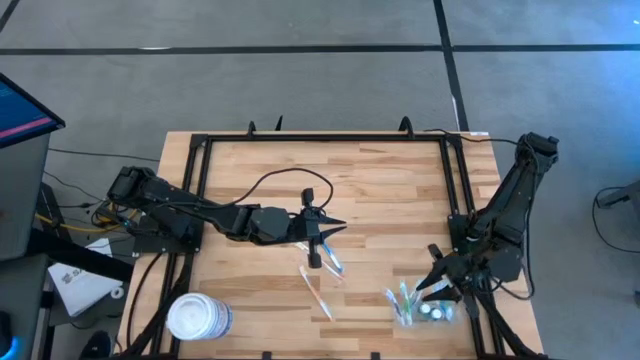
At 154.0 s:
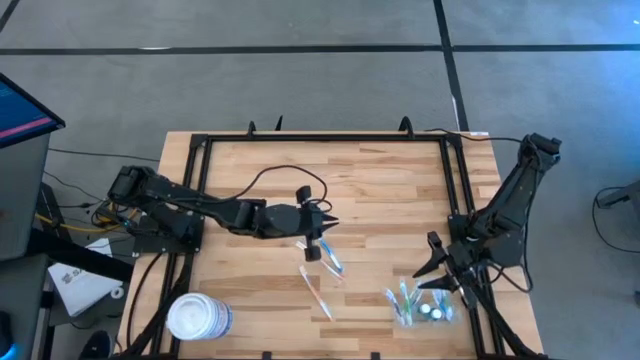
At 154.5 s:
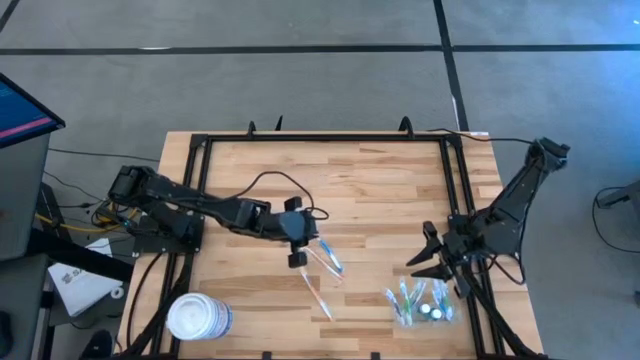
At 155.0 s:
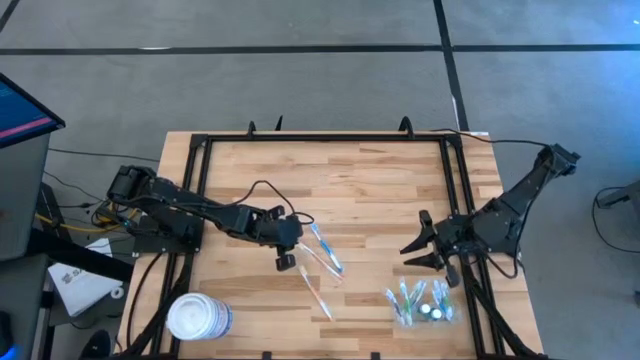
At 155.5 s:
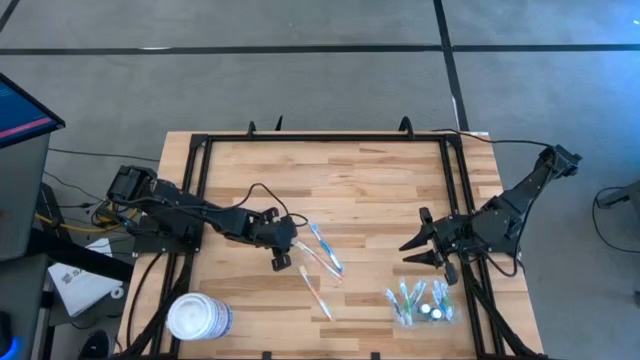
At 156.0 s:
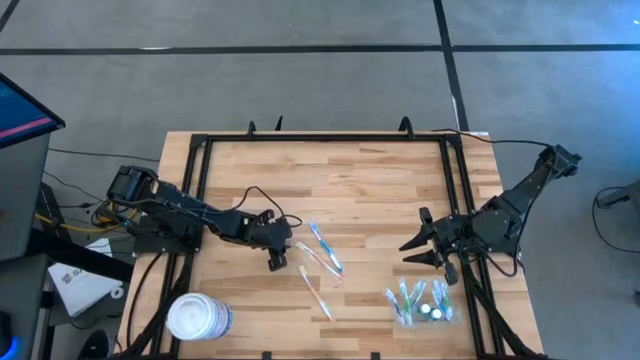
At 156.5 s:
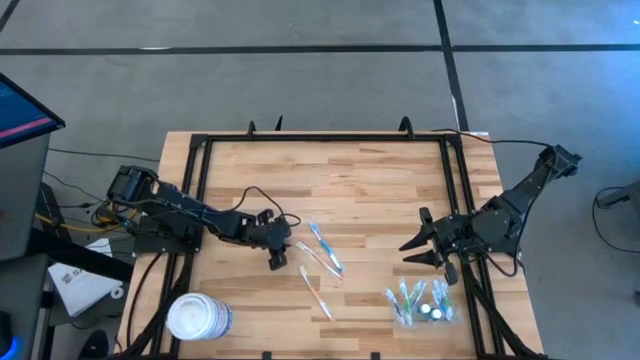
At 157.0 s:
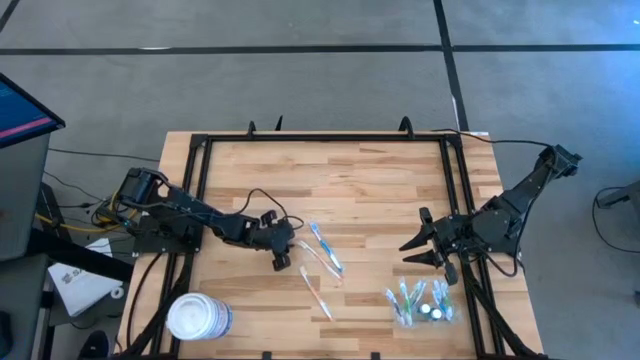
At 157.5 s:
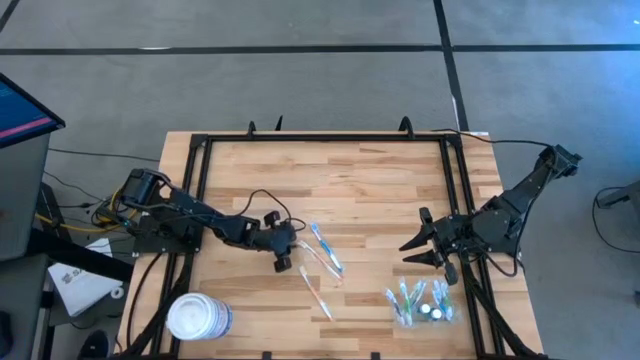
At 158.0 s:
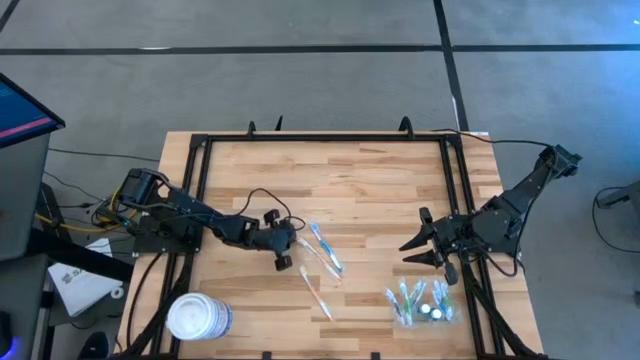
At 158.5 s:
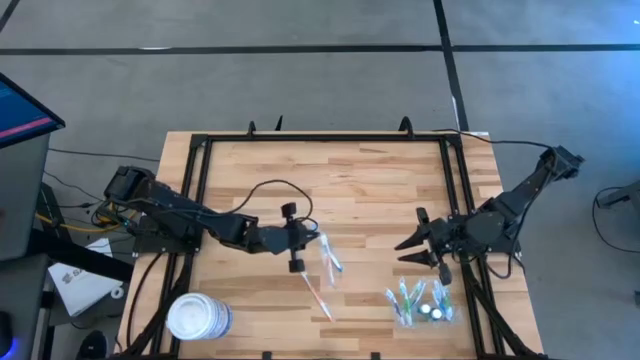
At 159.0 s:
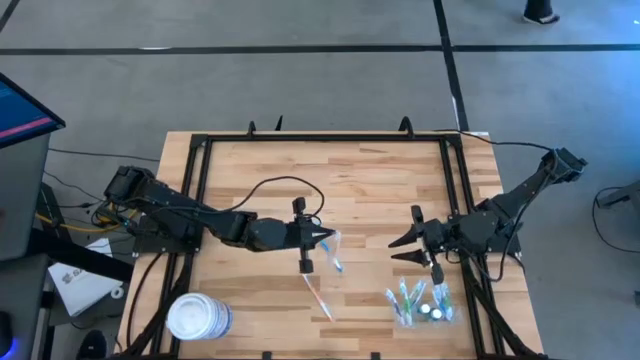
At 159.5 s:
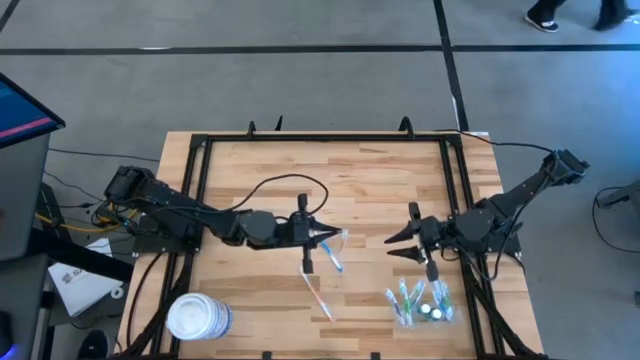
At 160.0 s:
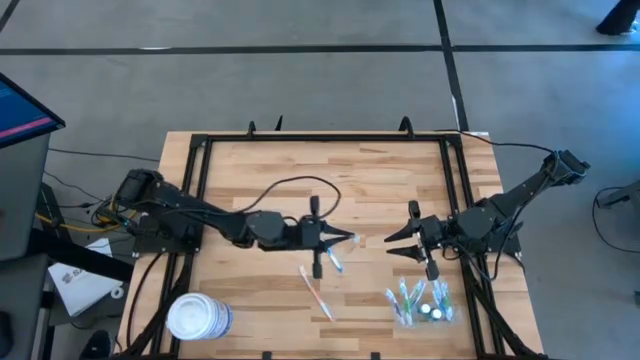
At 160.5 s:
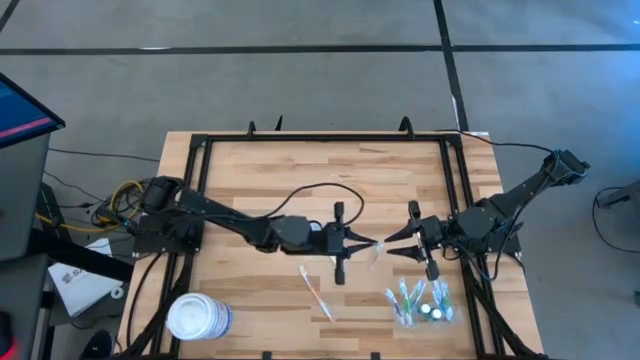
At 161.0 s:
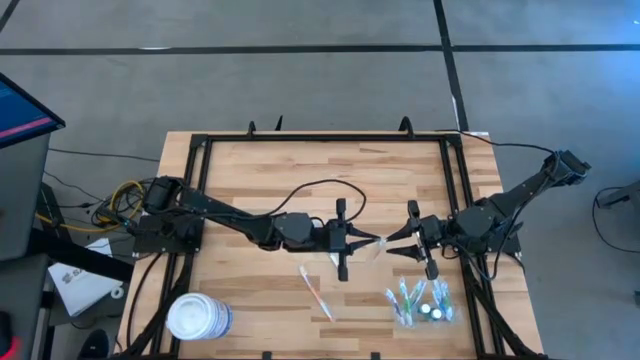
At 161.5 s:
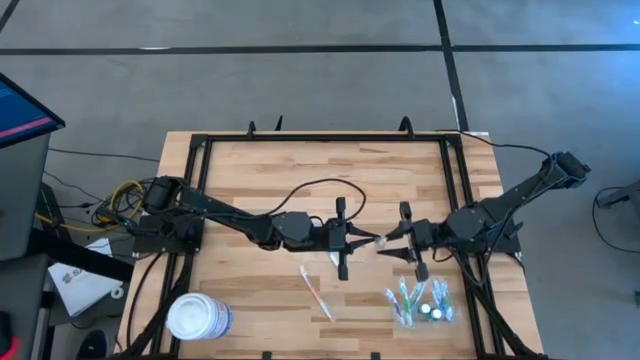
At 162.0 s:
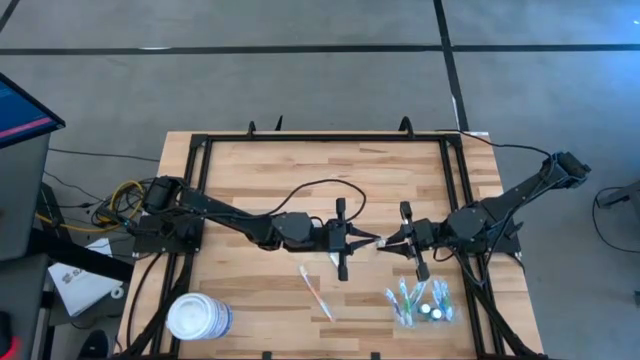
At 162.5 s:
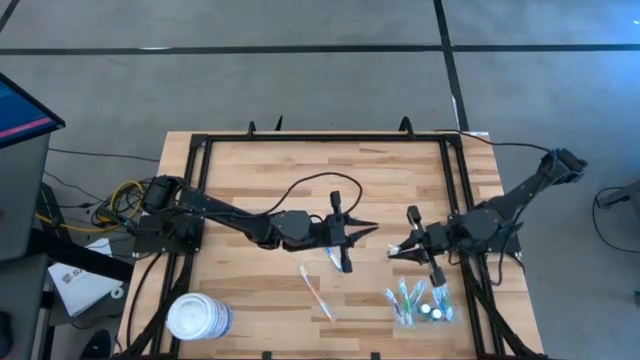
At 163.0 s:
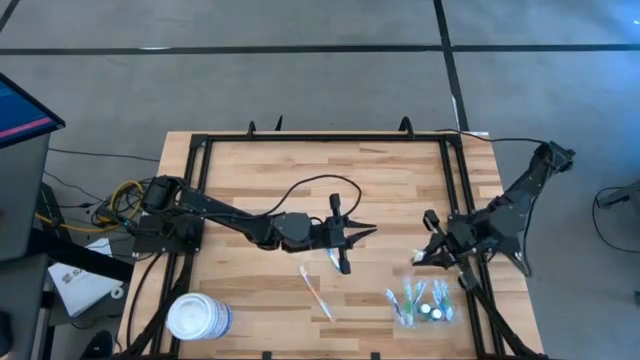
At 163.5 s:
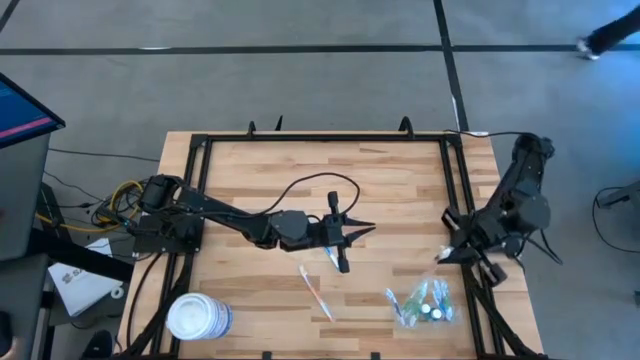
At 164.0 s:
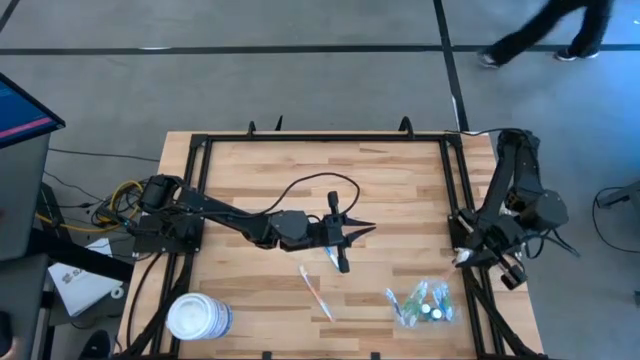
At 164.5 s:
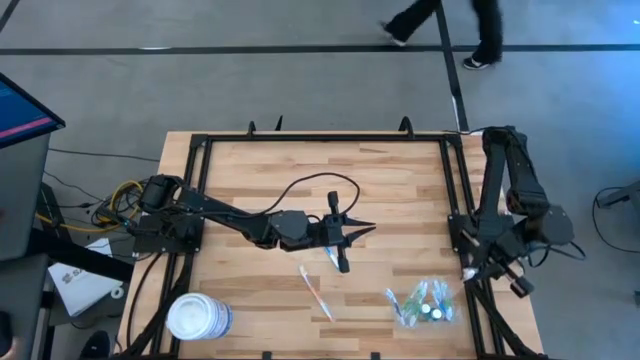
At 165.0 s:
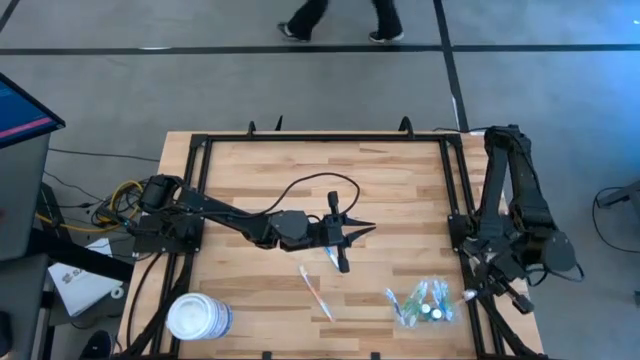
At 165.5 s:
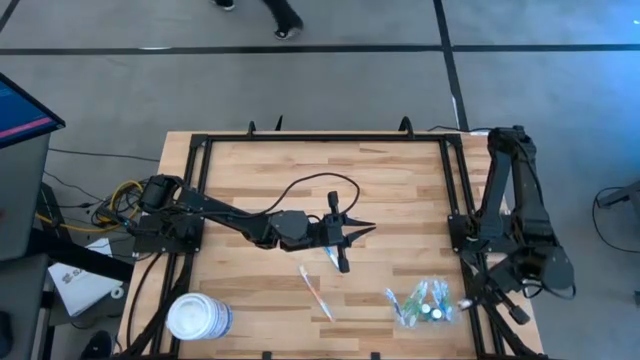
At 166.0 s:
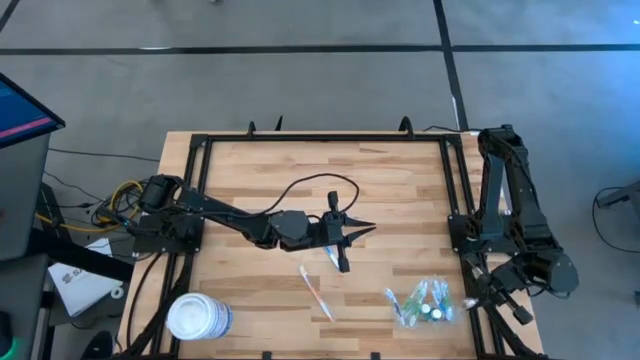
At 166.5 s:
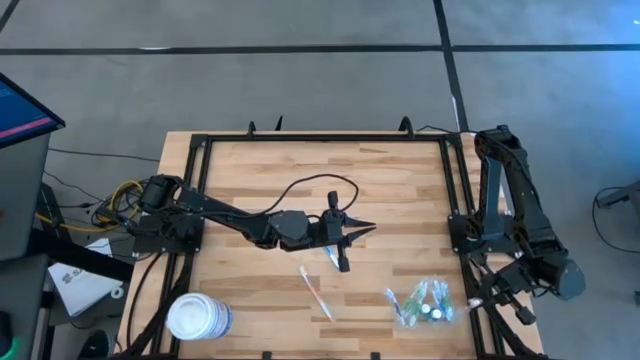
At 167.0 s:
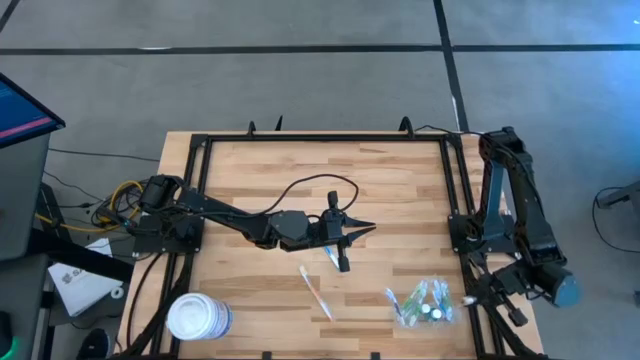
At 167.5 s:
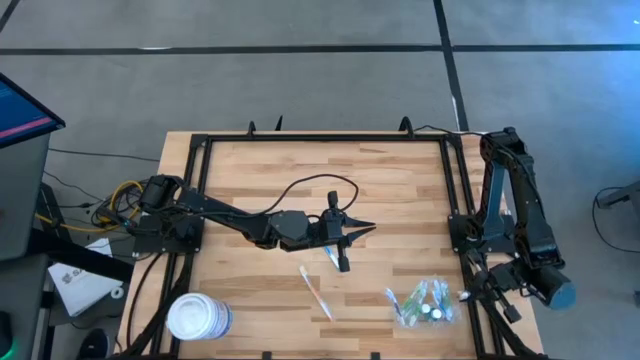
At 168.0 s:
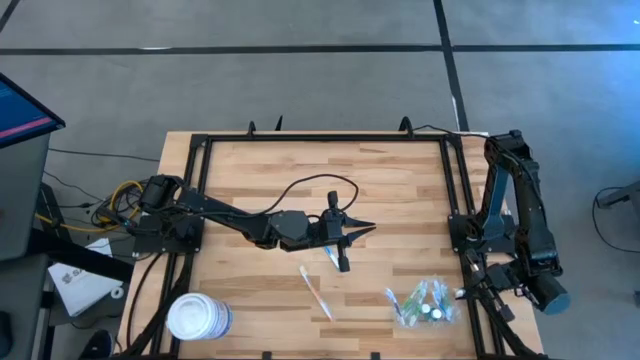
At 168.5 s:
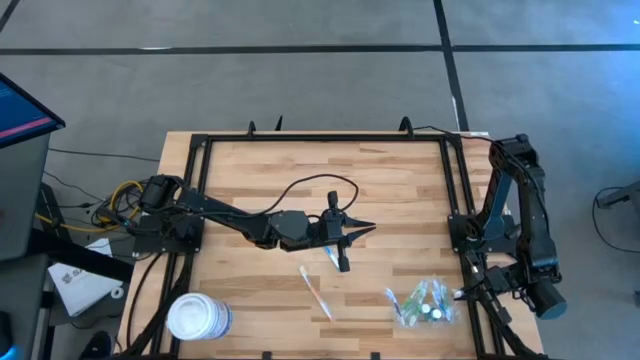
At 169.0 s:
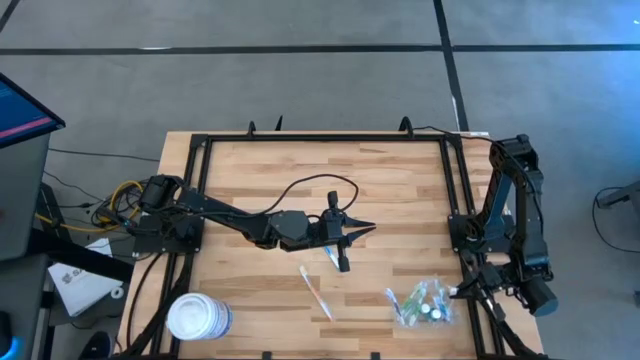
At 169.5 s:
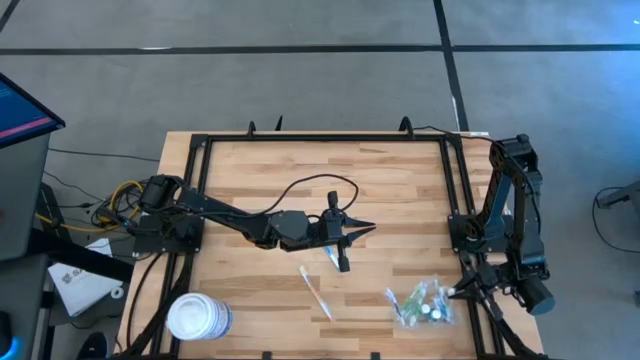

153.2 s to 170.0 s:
Task: Pick & Place toothbrushing station
Put the orange toothbrush into the transparent organizer

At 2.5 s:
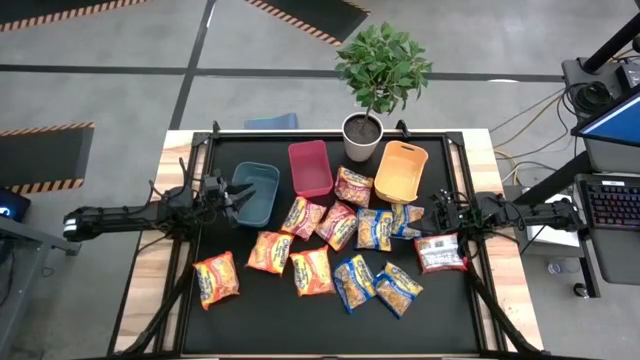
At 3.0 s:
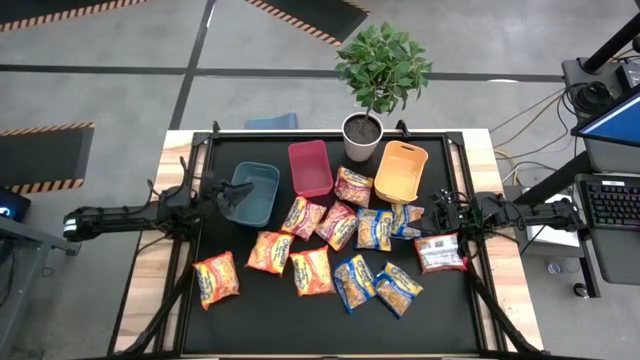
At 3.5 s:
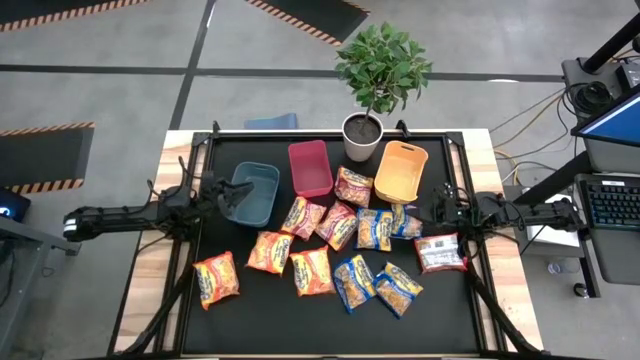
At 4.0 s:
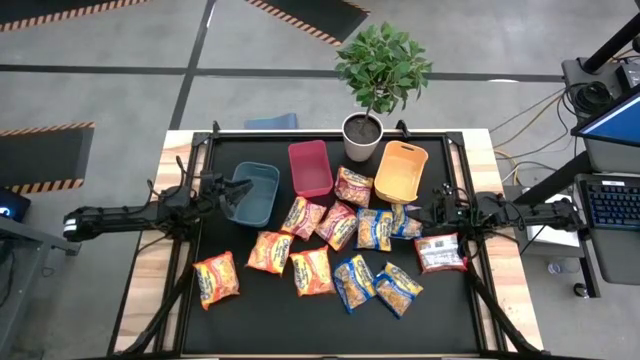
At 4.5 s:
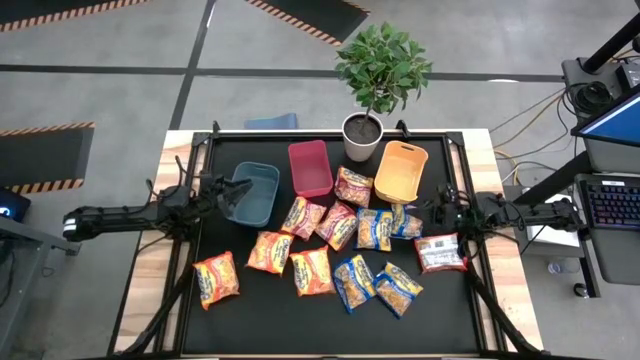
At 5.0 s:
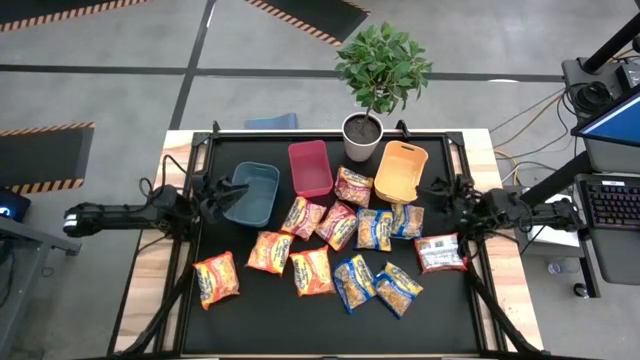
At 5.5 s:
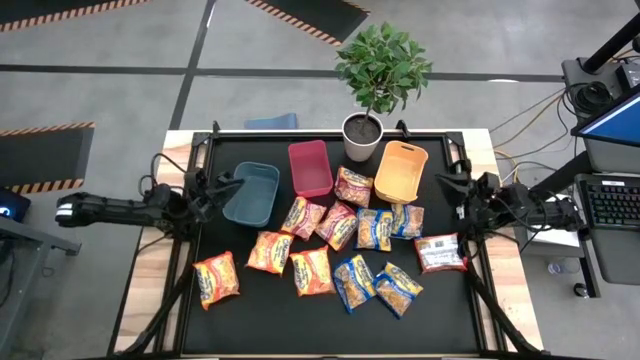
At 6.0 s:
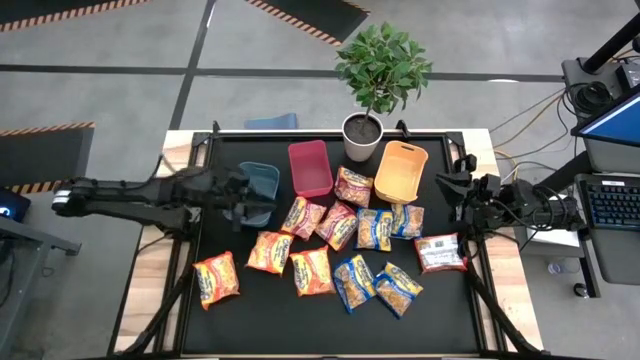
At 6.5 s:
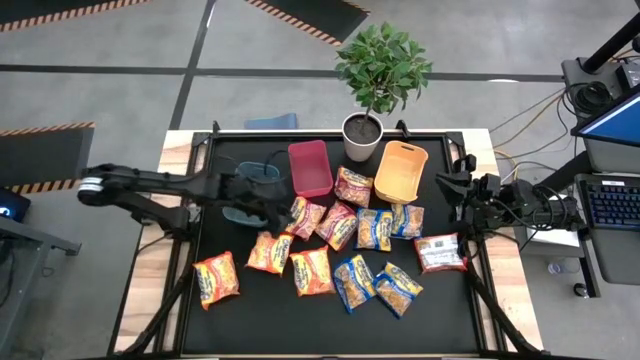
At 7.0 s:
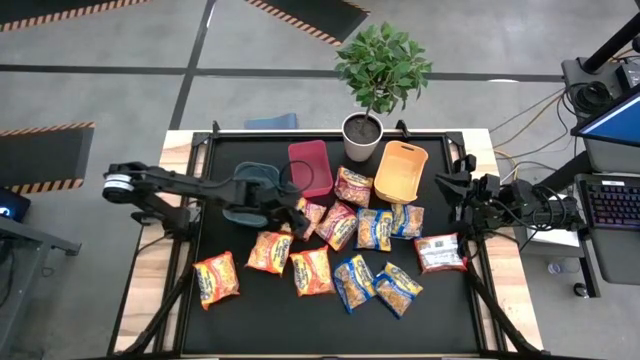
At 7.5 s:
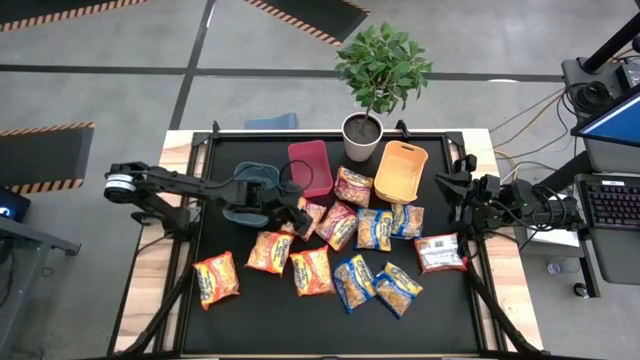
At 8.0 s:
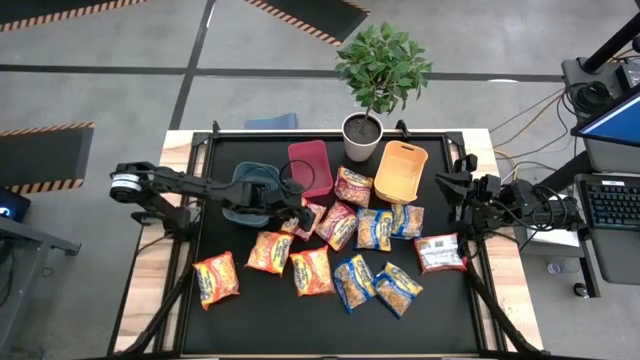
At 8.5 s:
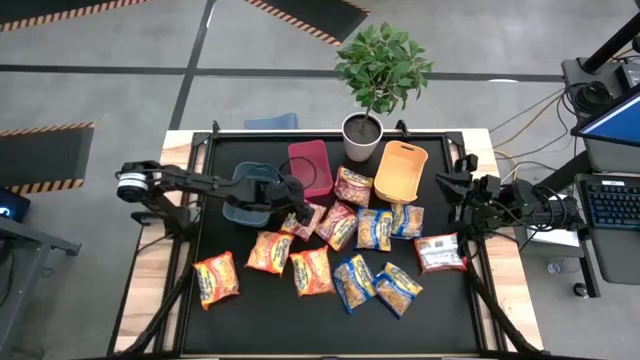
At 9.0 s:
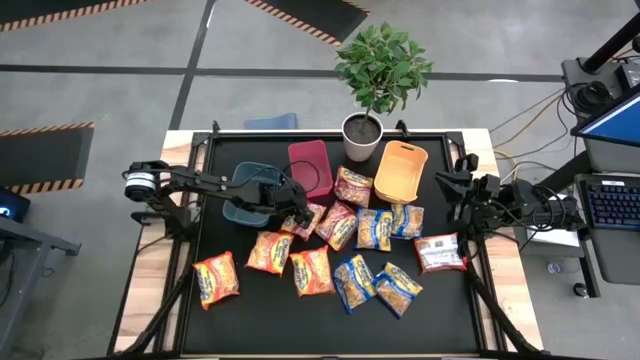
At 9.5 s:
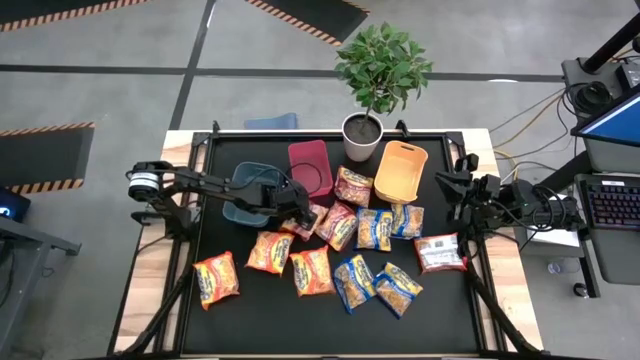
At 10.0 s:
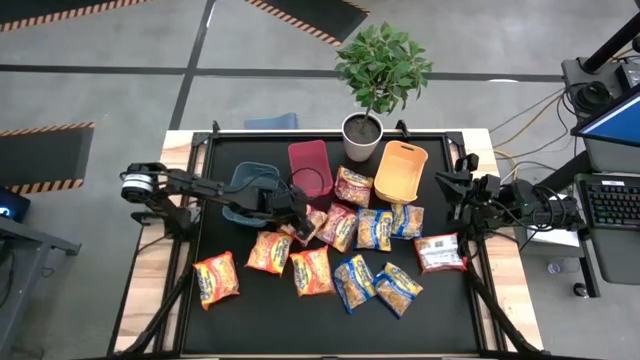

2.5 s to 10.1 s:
Task: Sort Maruchan noodles
Put the left red noodle pack into the blue bin
